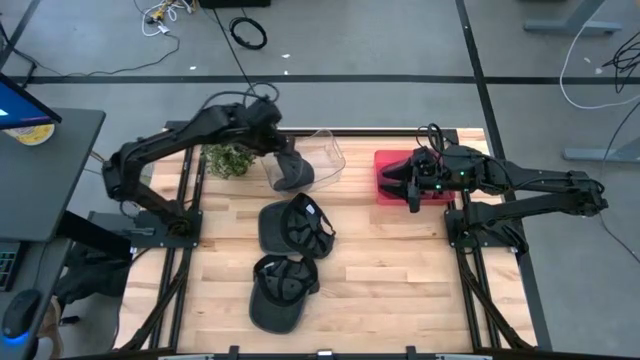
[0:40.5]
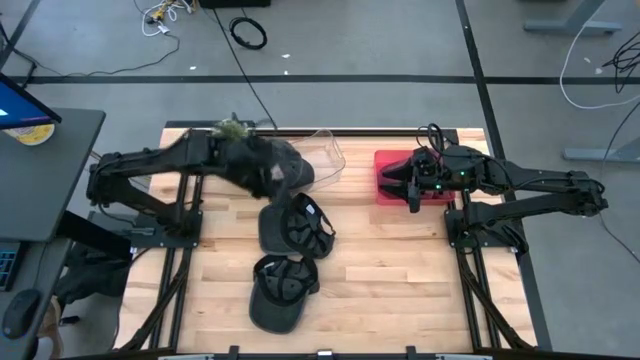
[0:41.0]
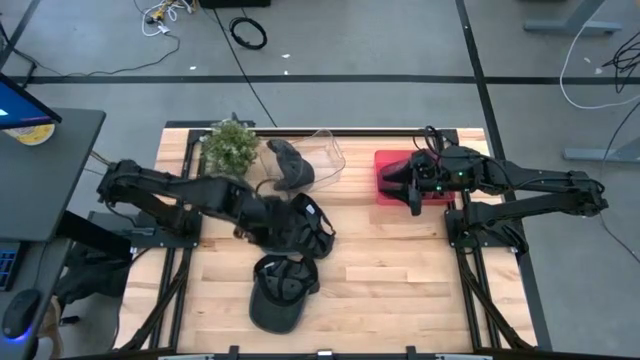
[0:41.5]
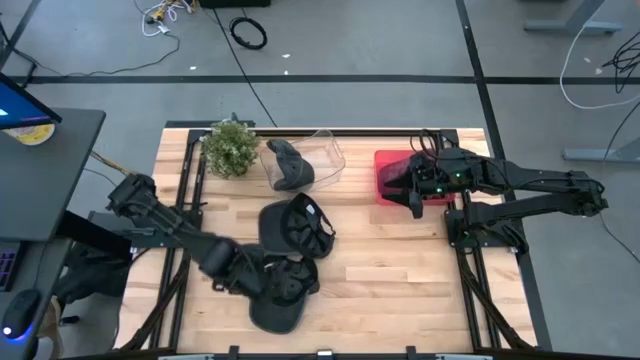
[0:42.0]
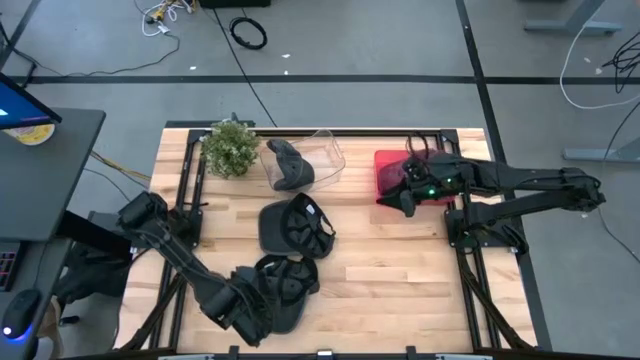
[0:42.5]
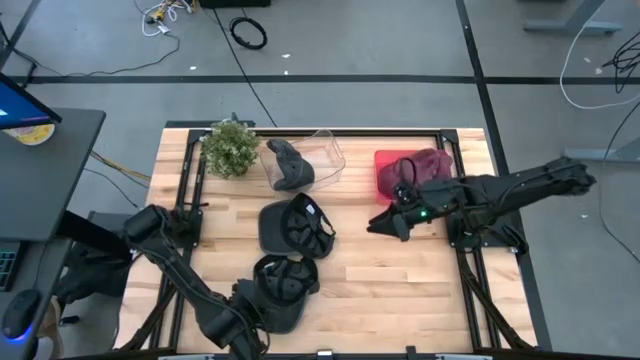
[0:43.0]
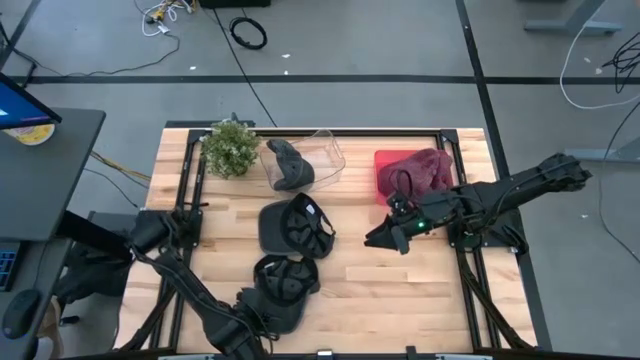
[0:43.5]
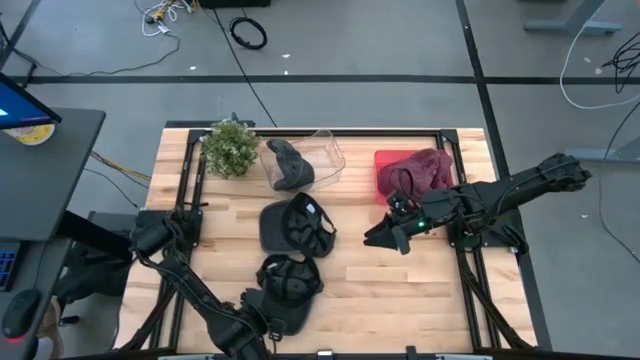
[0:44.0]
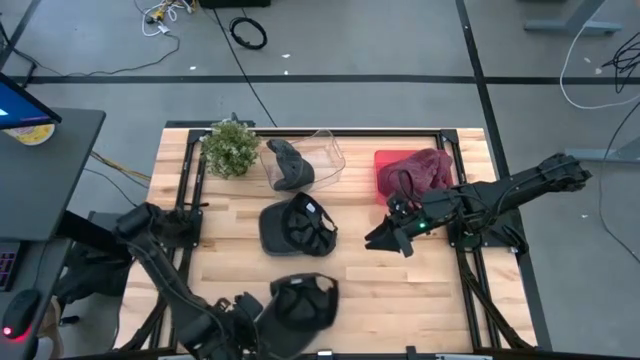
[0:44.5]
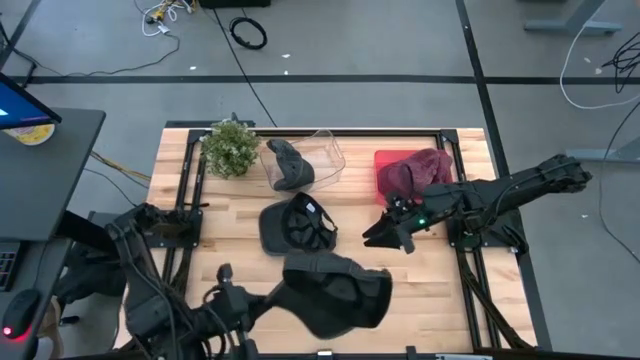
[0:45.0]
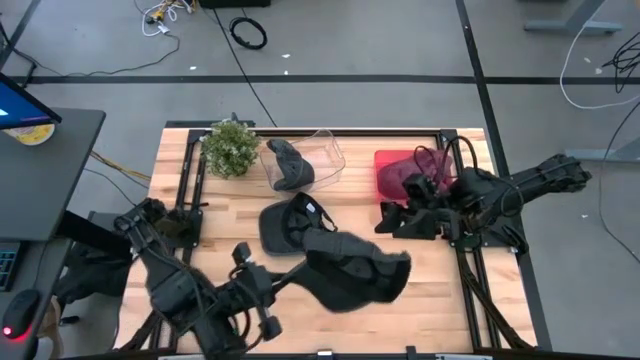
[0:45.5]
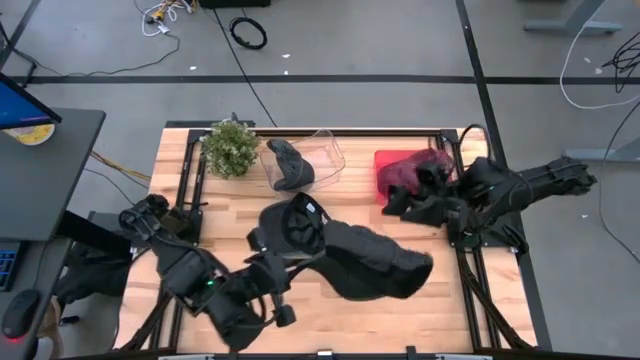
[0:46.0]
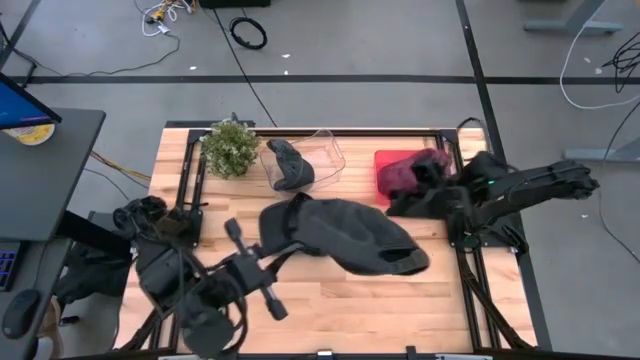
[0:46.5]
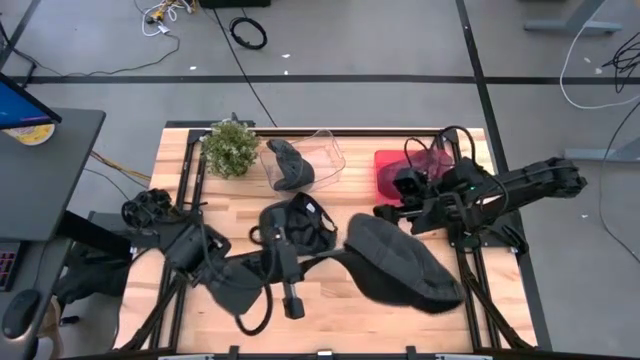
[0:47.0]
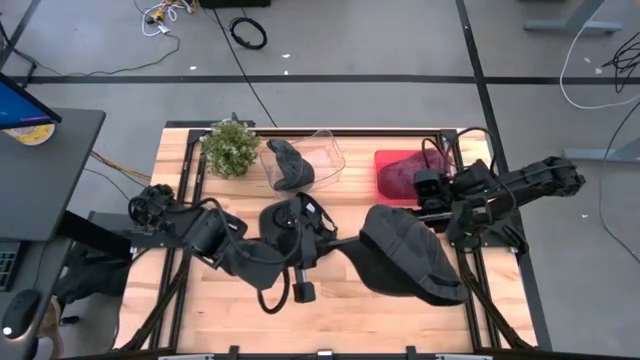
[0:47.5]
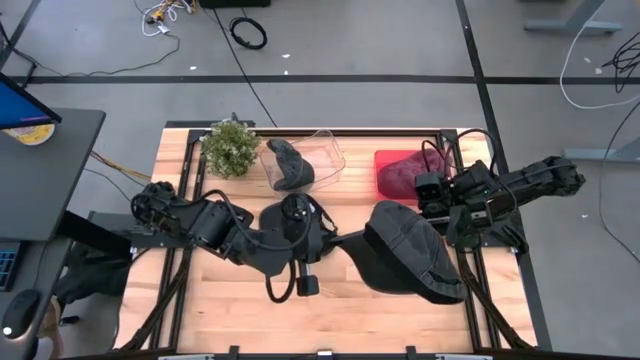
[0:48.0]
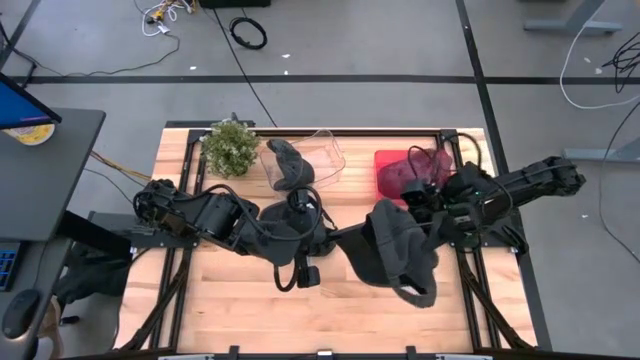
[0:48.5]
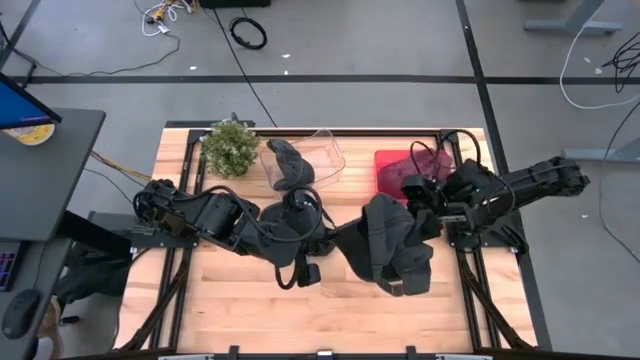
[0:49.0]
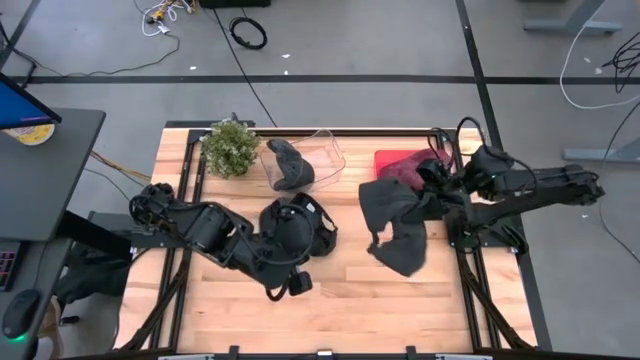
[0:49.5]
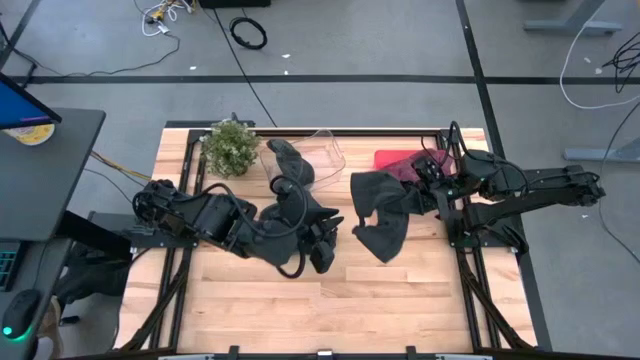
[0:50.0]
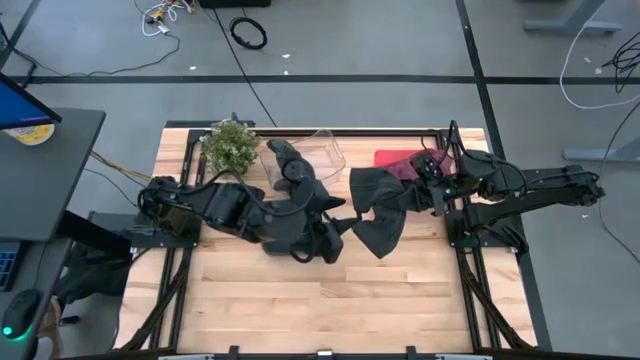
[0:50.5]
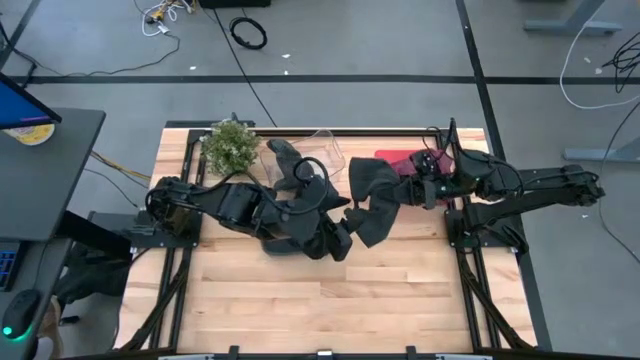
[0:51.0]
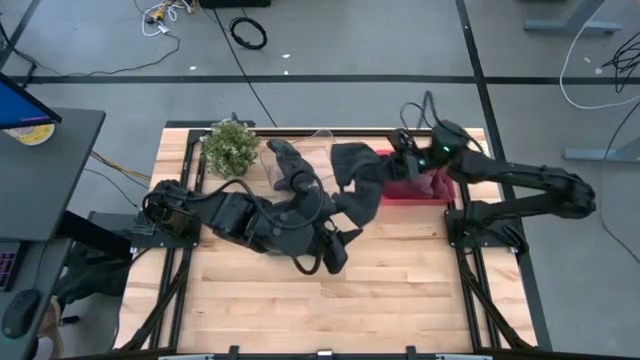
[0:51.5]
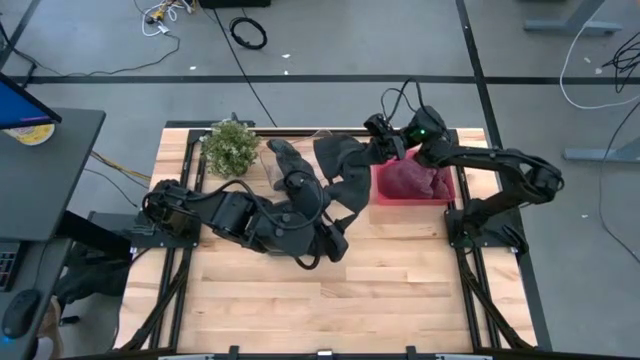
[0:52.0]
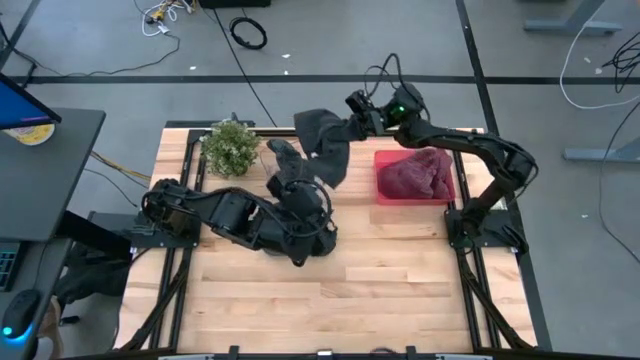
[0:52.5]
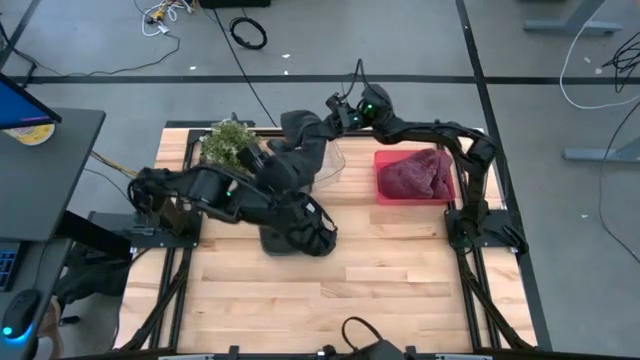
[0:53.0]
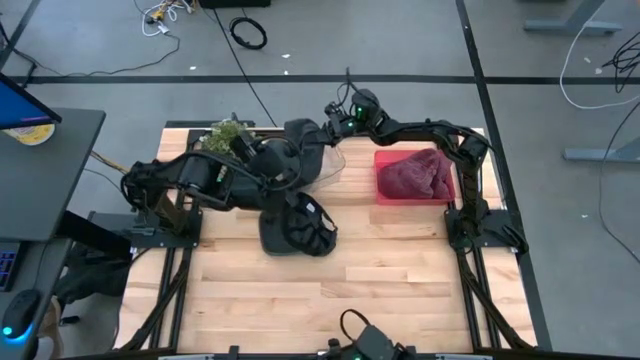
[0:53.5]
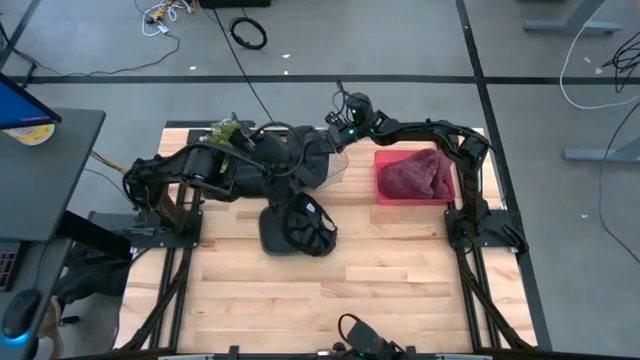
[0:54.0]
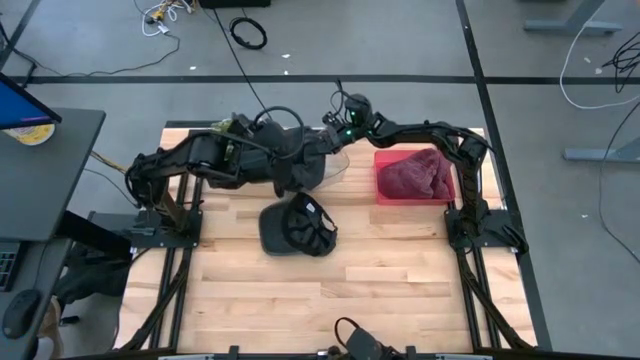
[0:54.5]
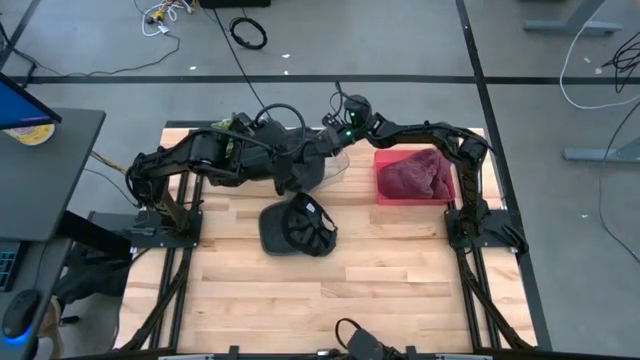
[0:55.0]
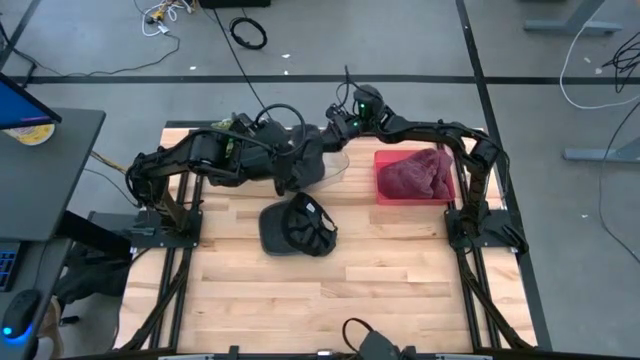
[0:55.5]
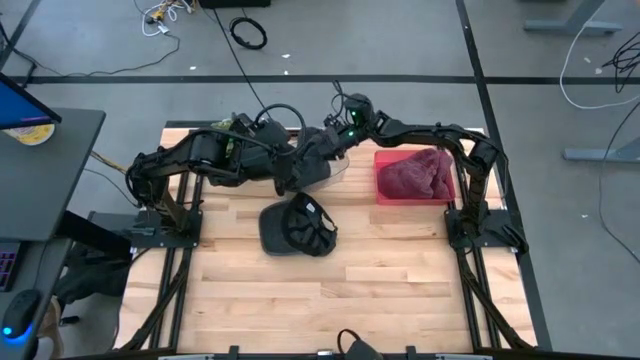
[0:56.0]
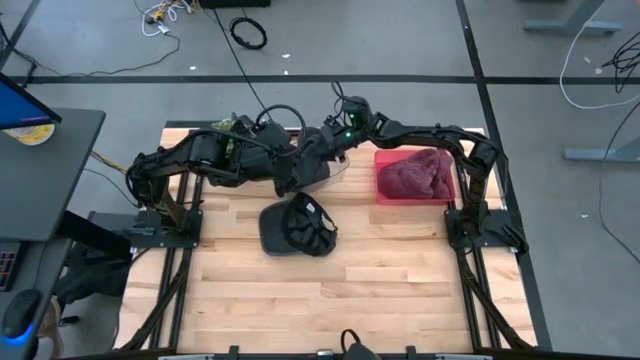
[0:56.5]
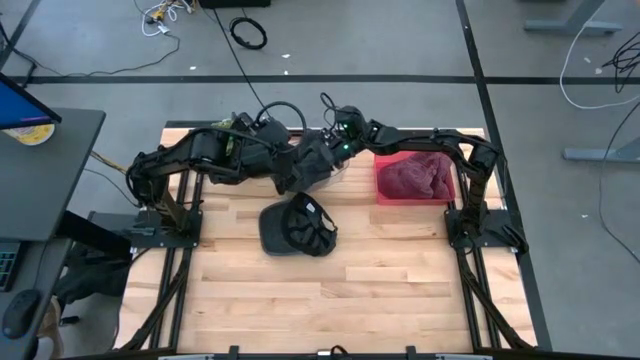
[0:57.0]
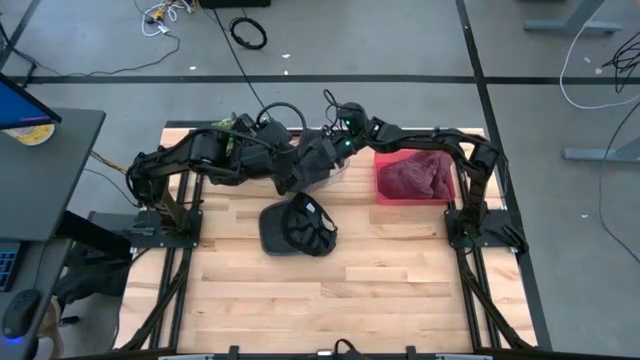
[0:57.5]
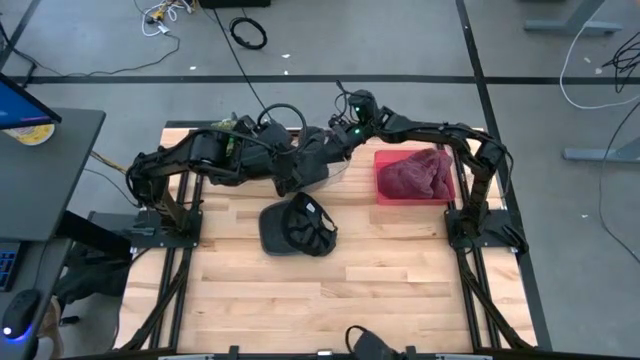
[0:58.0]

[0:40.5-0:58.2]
Task: Pick & Place hat
Put the bottom black cap into the transparent bin

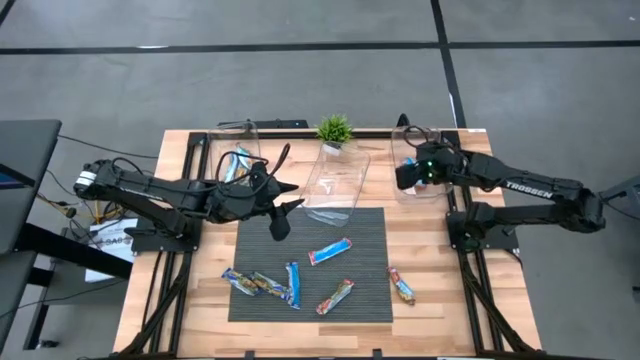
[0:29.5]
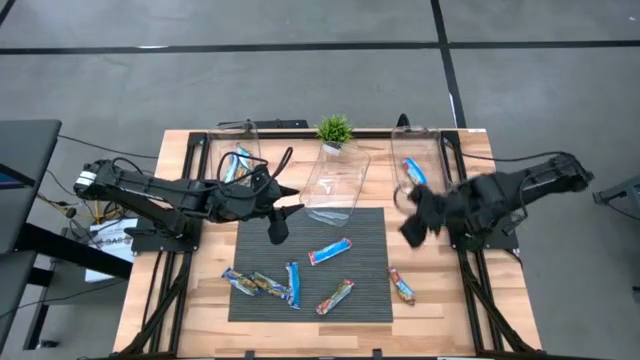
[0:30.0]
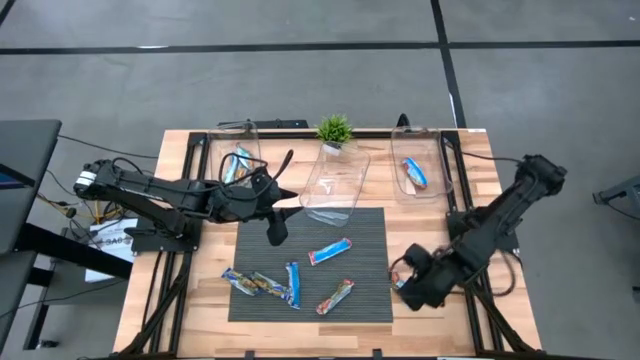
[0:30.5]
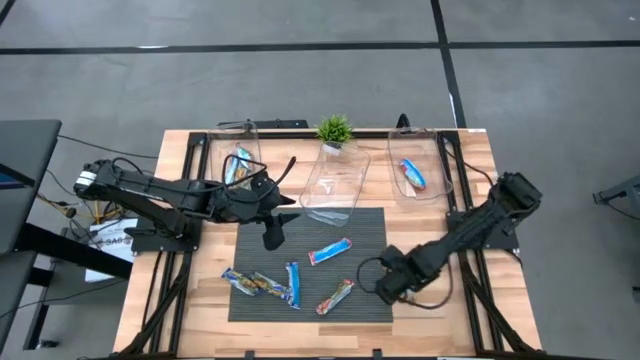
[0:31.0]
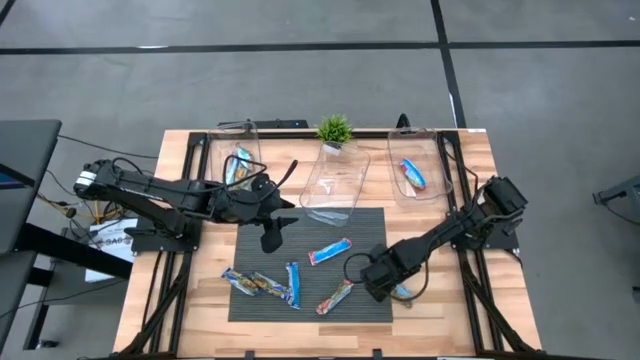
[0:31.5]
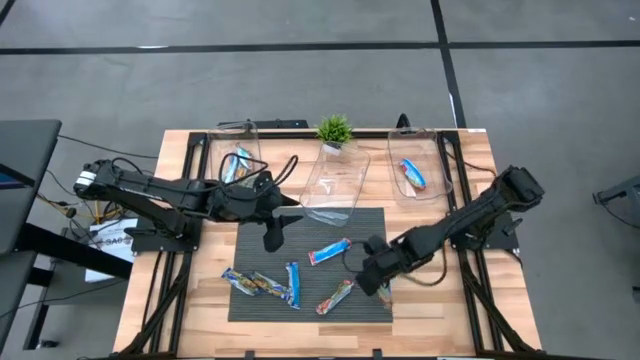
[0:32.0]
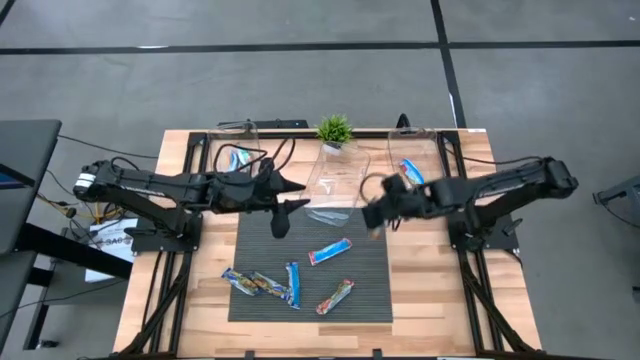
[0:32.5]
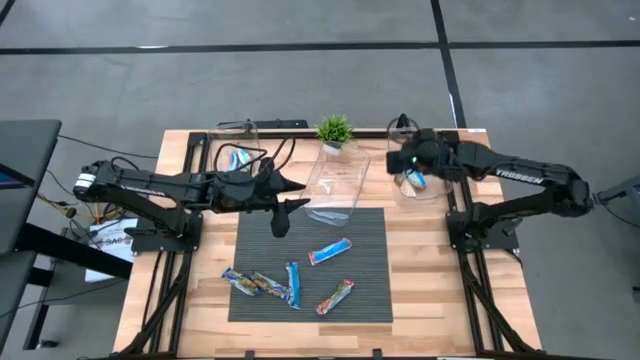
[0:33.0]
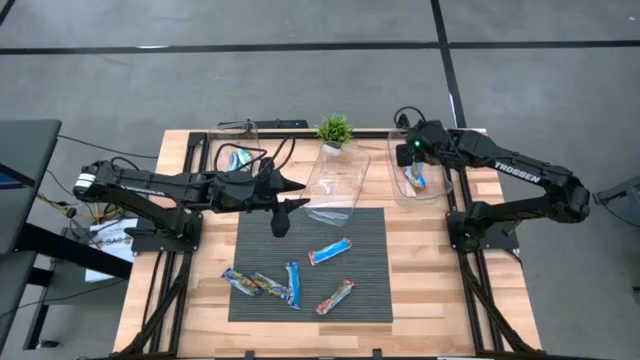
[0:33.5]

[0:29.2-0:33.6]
Task: Pick and place Granola Bars by type
Put the red granola bar into the right transparent bin
